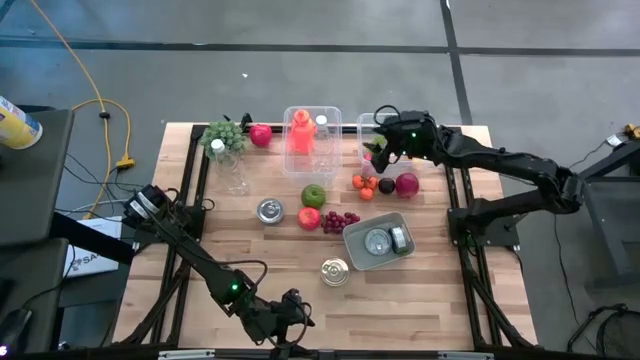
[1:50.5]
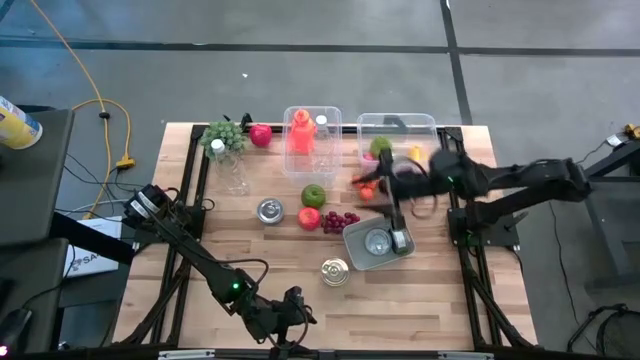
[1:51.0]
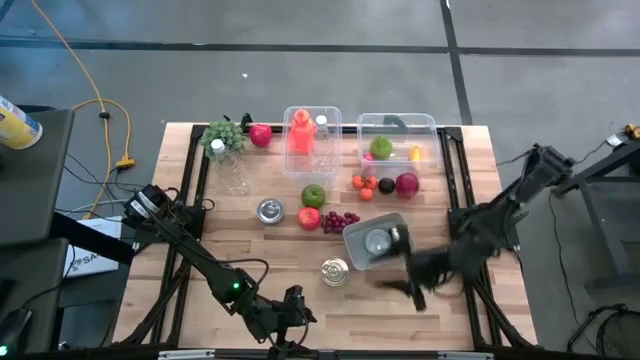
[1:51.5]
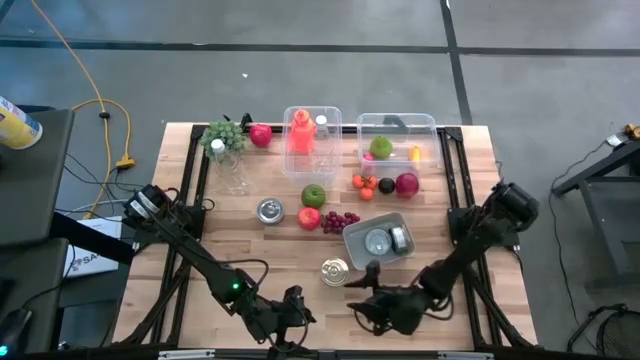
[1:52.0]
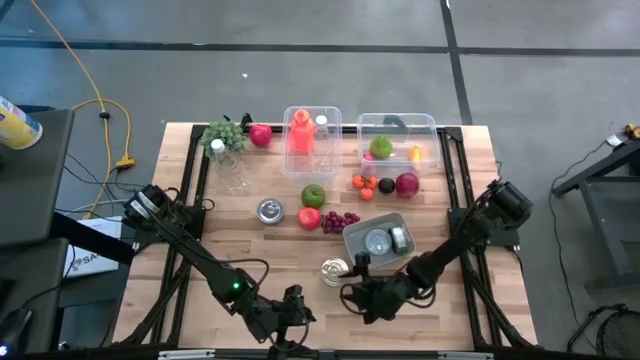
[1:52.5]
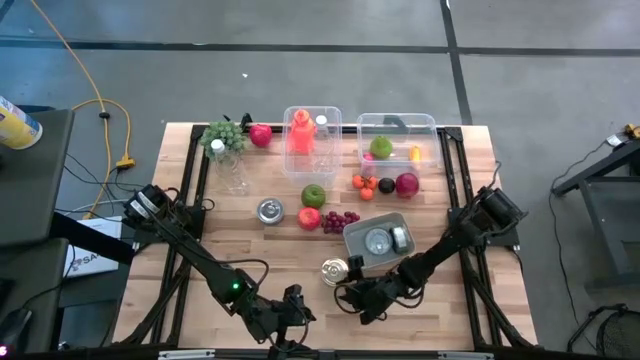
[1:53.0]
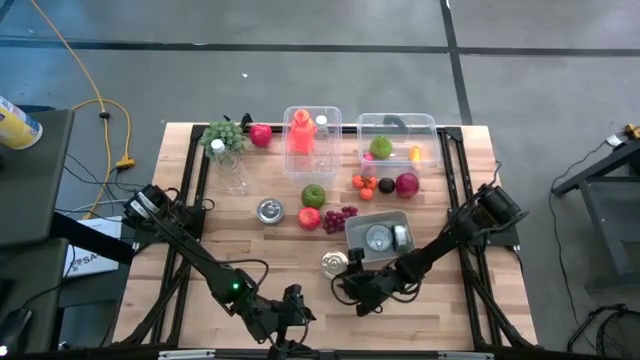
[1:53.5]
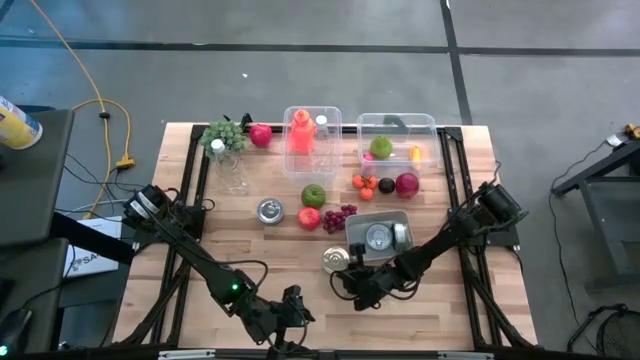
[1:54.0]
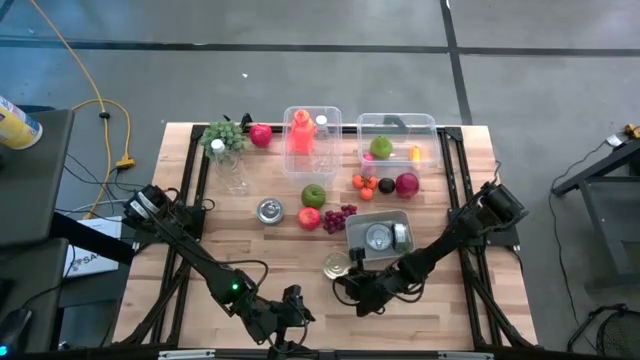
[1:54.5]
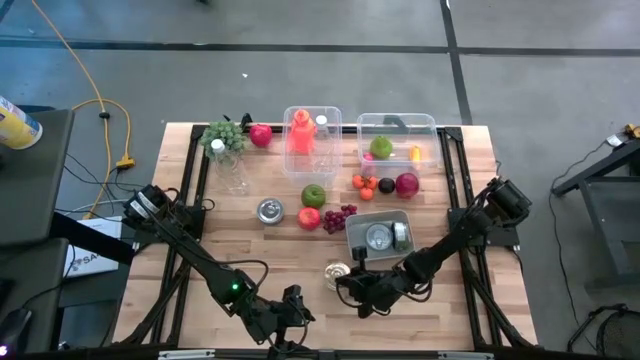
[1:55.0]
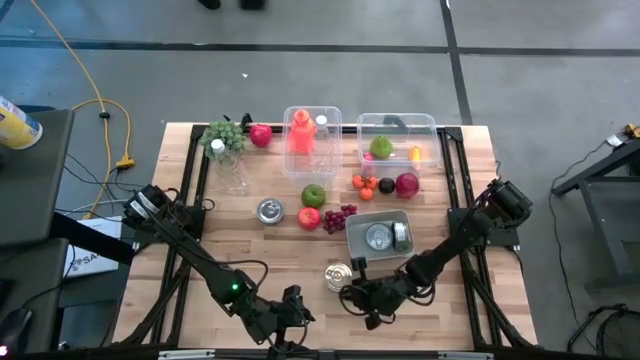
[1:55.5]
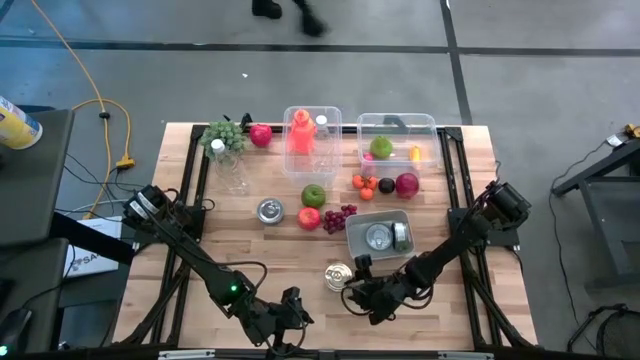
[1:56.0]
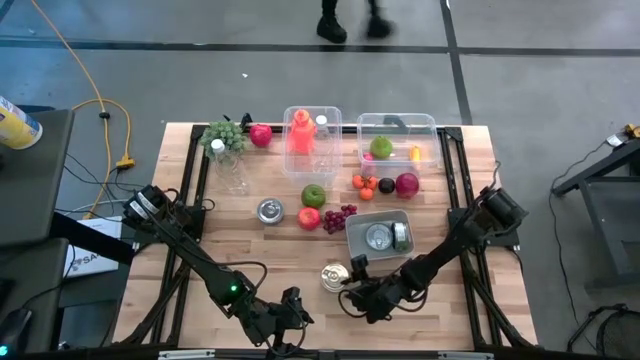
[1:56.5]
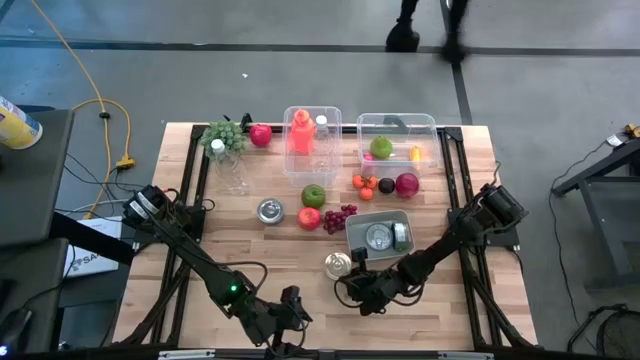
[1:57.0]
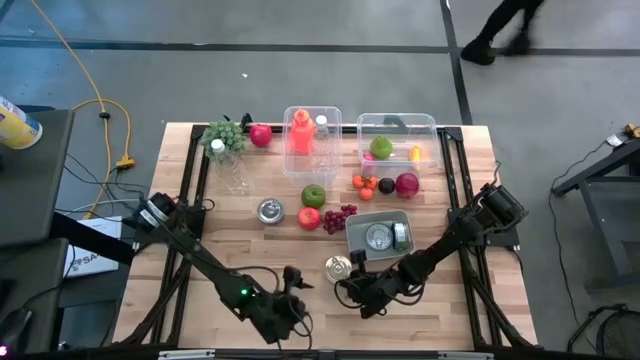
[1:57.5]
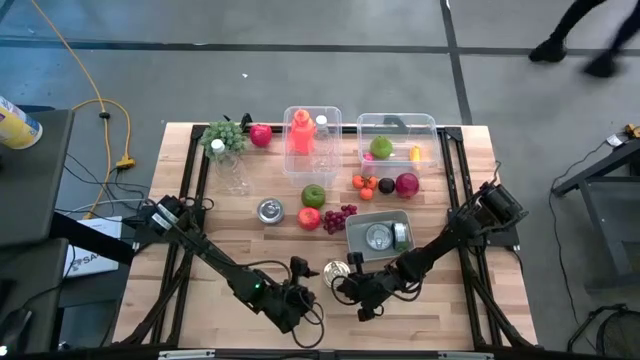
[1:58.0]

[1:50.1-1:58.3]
Task: Pick & Place Food Item
Put the blue pink tuna can into the gray bin

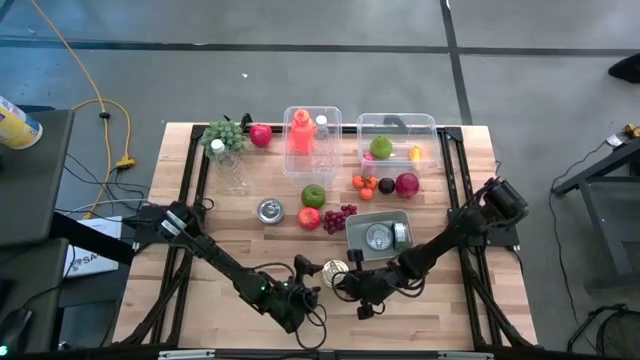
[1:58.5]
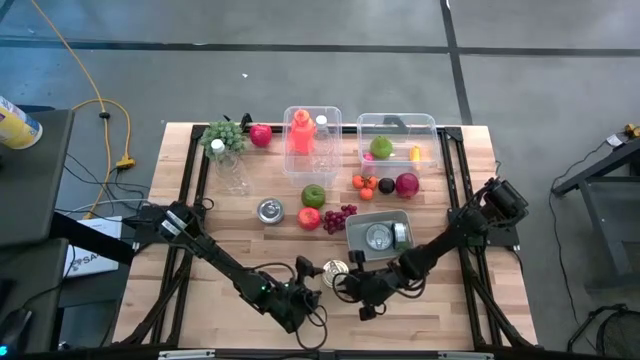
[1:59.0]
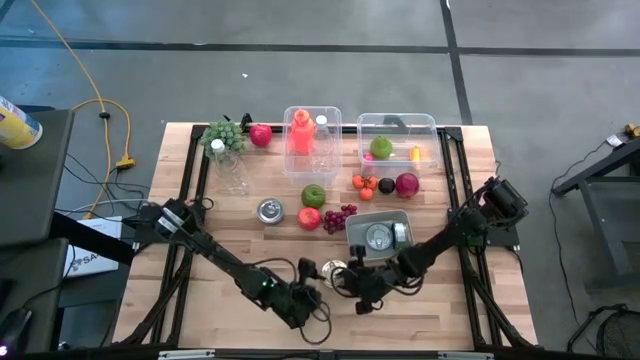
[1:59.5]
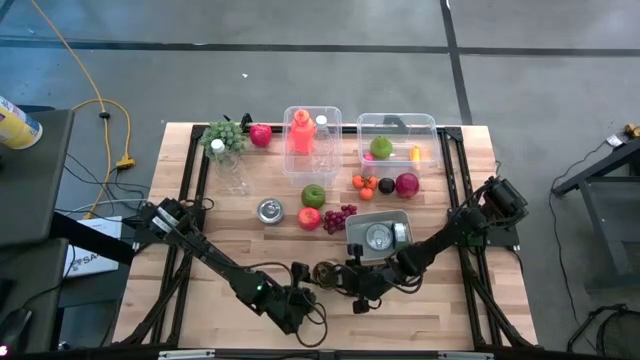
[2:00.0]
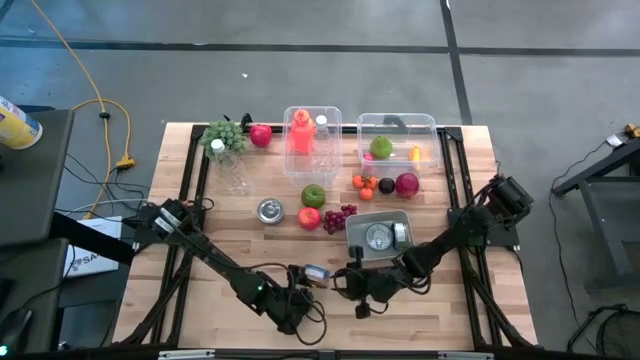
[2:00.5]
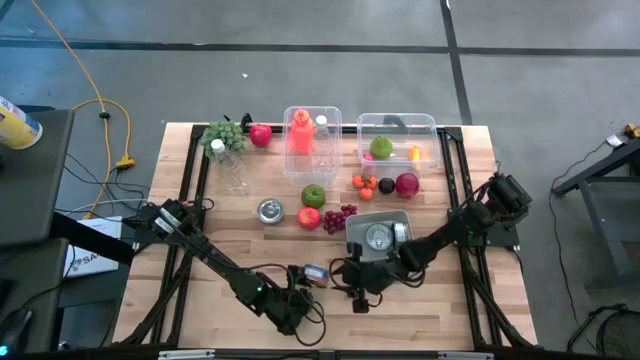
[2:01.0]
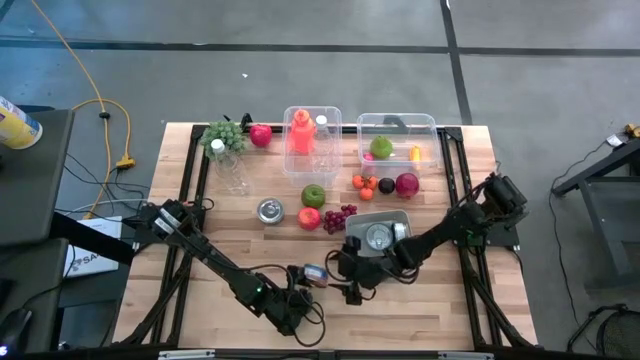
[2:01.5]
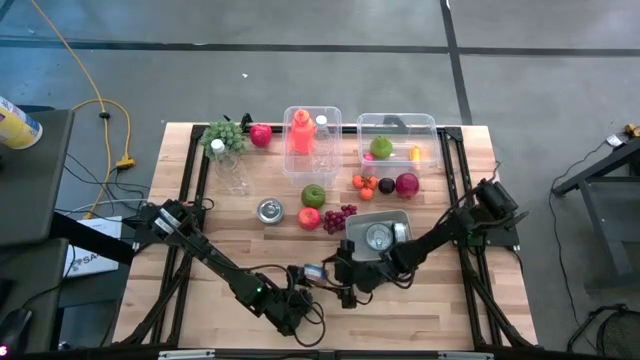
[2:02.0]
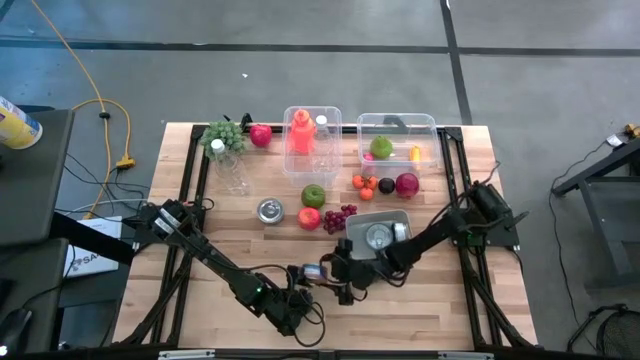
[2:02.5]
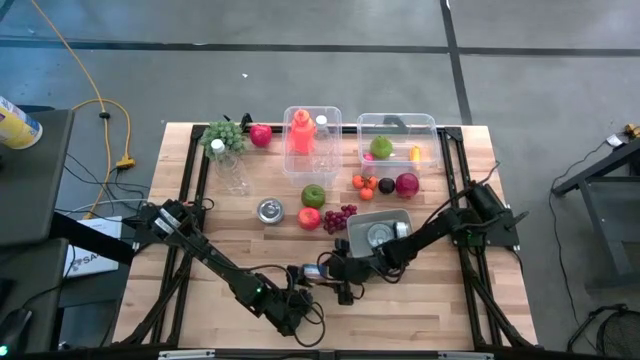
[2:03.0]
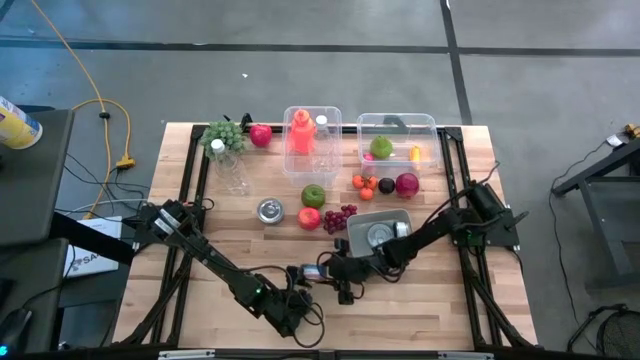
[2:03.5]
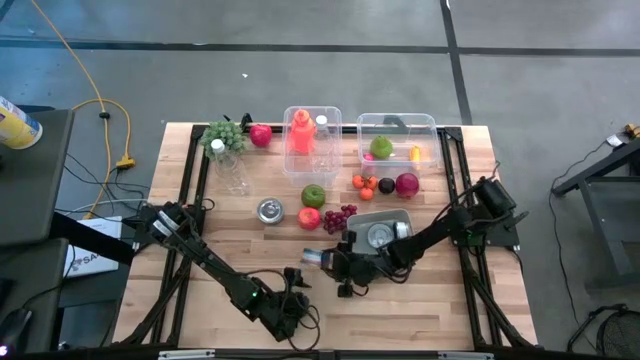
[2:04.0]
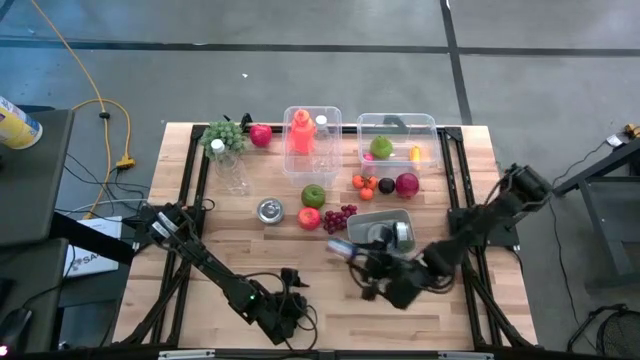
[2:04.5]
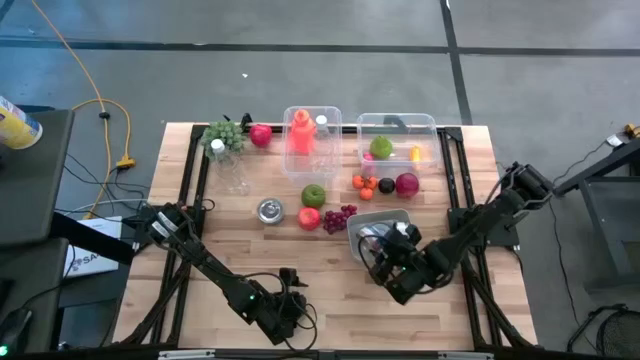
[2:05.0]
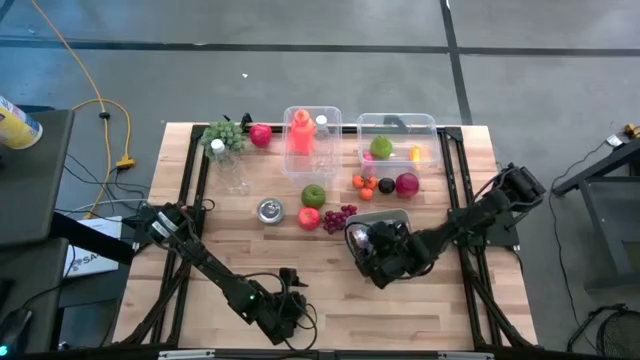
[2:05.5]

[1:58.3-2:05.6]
Put the blue pink tuna can into the gray bin

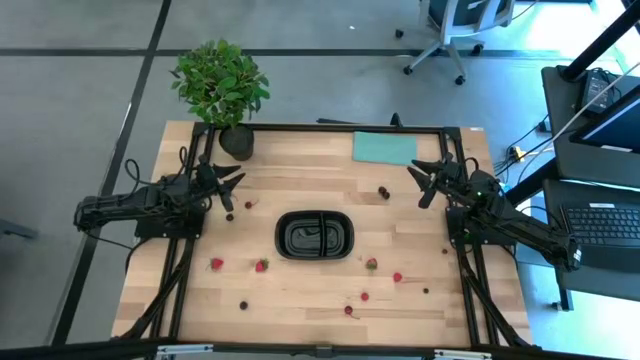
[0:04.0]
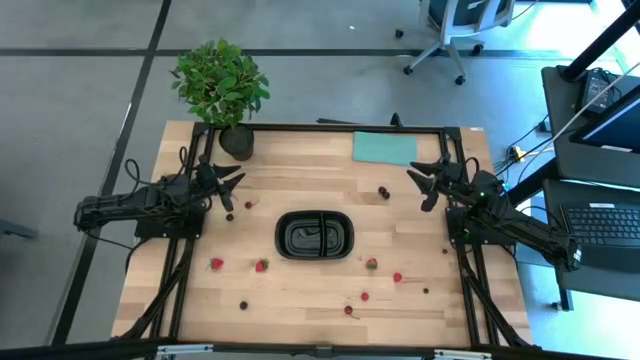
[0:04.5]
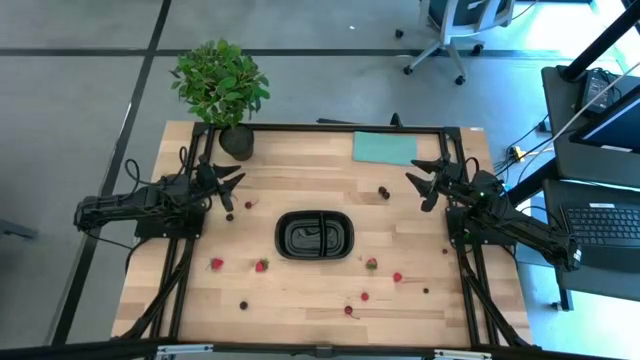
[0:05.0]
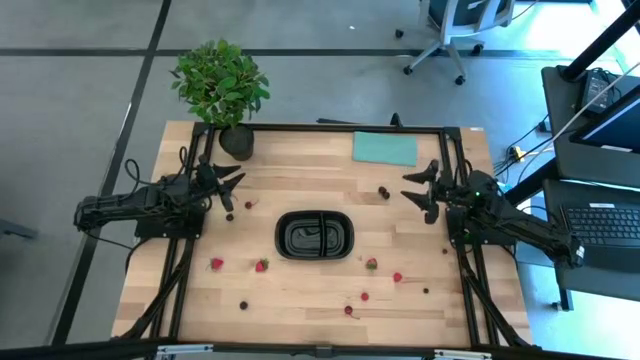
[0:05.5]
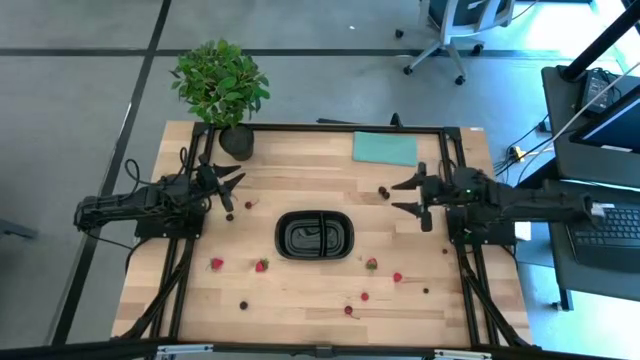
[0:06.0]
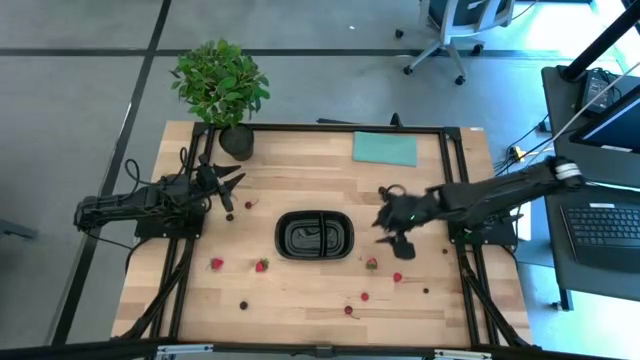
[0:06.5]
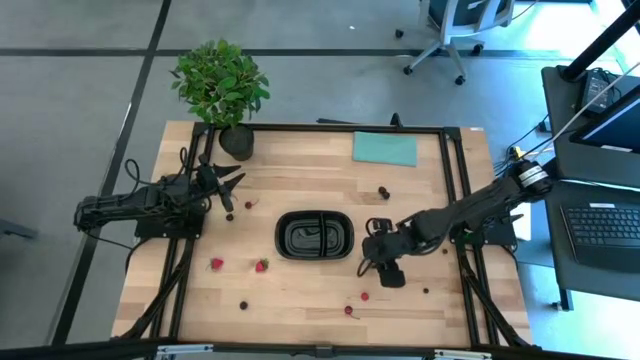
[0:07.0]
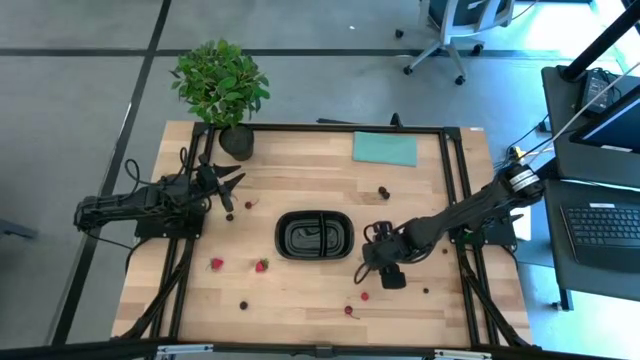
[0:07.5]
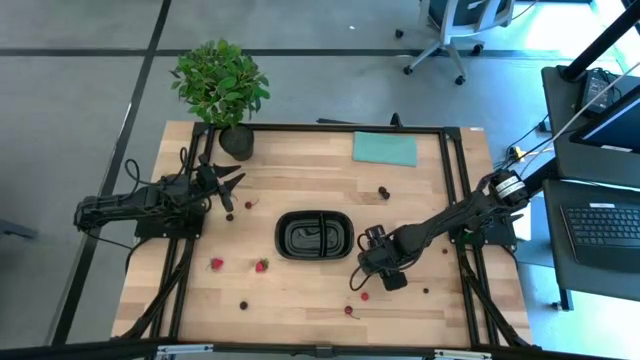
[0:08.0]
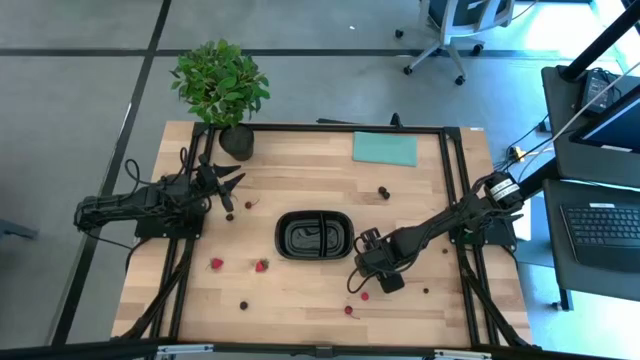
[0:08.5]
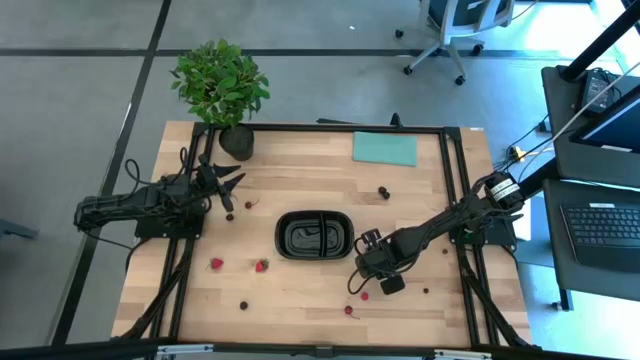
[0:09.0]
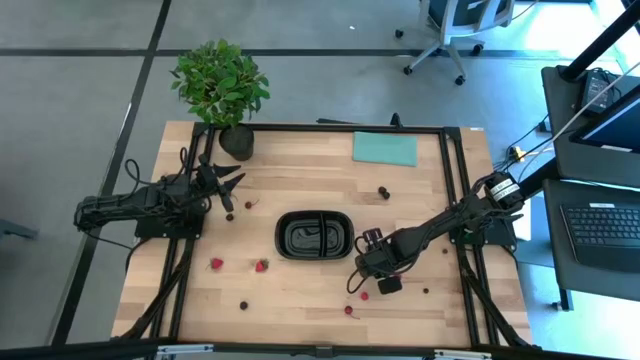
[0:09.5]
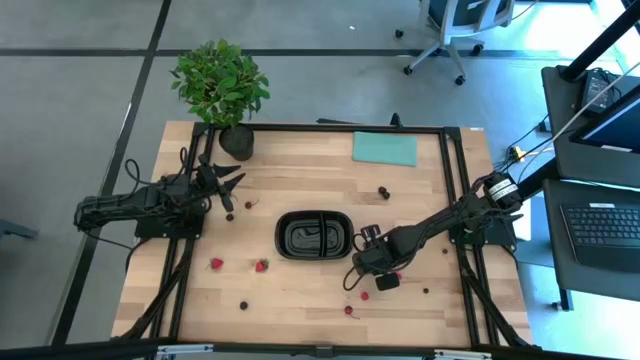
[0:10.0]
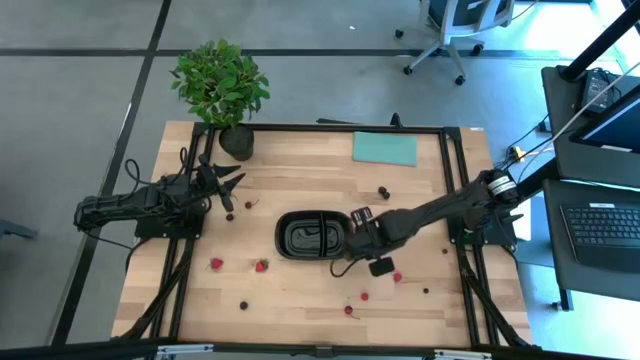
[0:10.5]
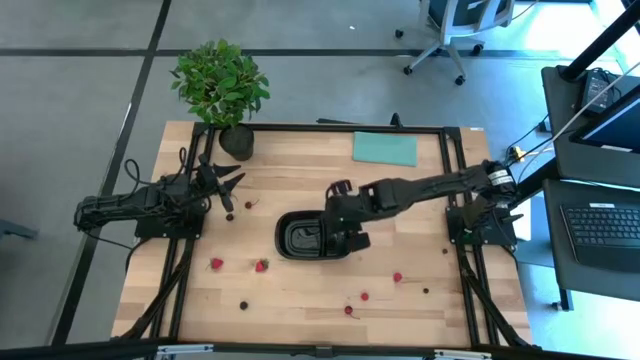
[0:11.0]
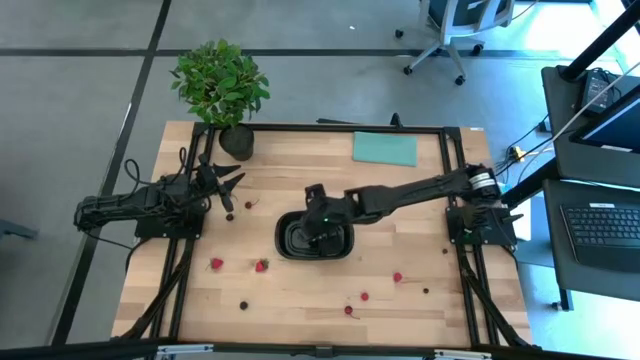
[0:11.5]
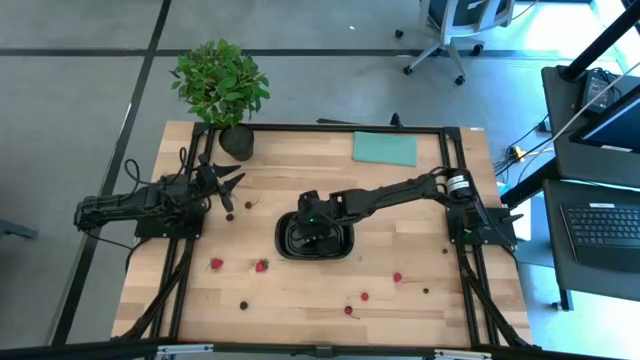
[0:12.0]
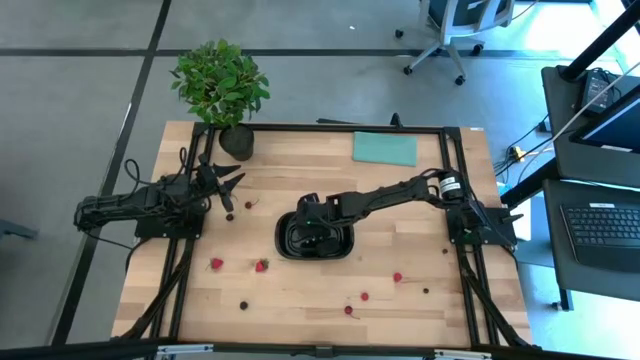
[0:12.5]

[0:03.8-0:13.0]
Task: Pick and placing Produce into tupperware
Put the right strawberry into the left section of the black bin
